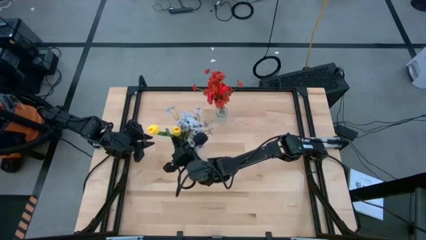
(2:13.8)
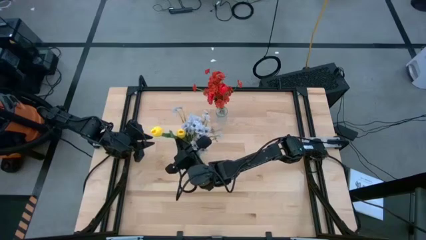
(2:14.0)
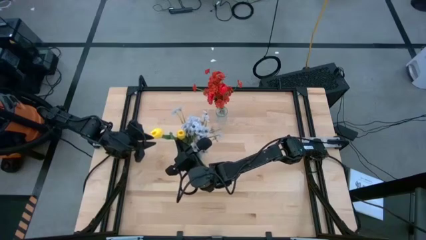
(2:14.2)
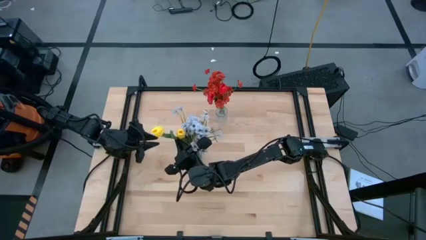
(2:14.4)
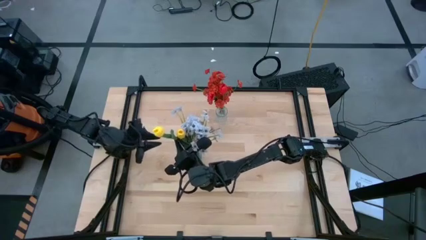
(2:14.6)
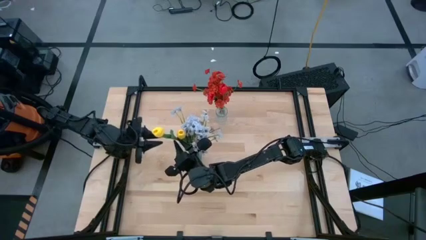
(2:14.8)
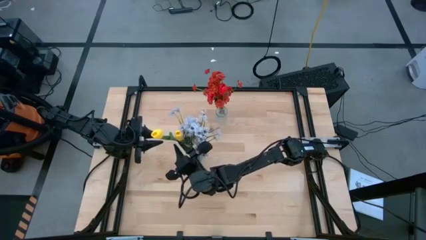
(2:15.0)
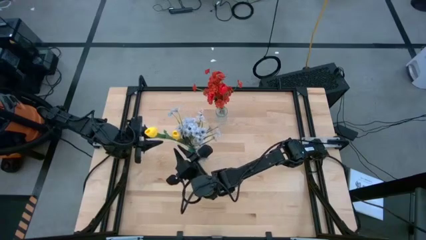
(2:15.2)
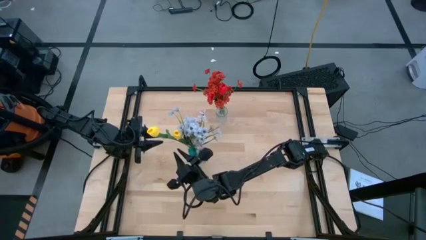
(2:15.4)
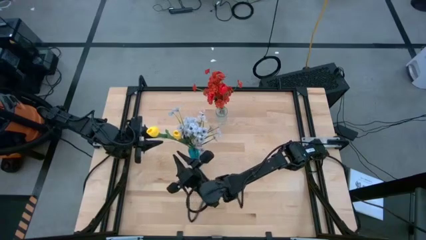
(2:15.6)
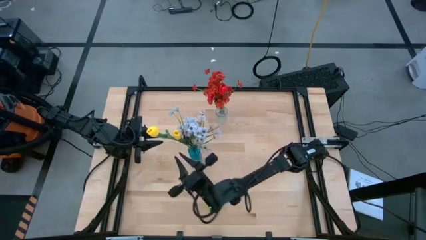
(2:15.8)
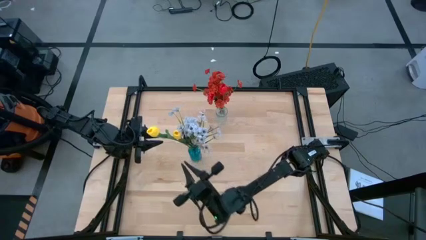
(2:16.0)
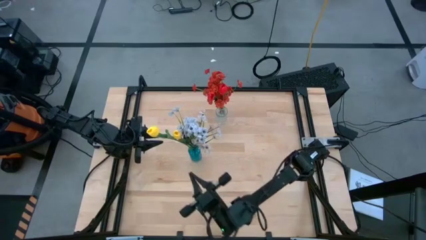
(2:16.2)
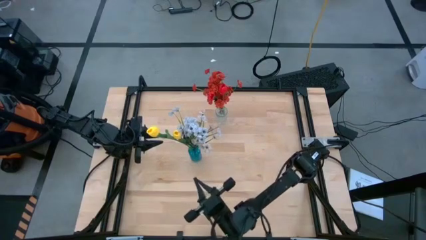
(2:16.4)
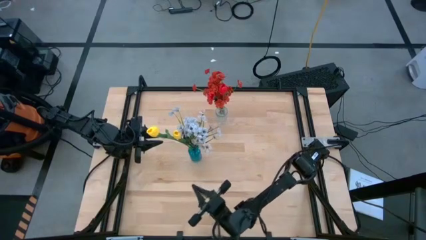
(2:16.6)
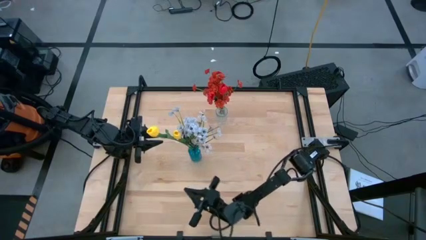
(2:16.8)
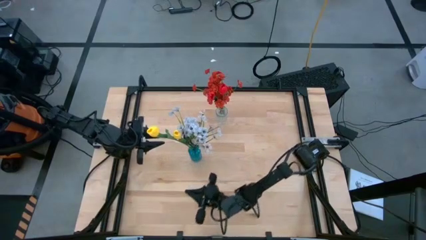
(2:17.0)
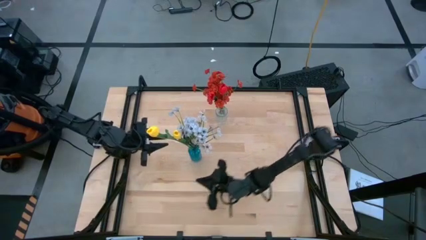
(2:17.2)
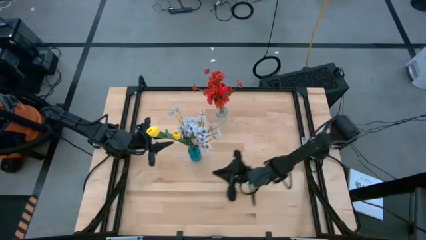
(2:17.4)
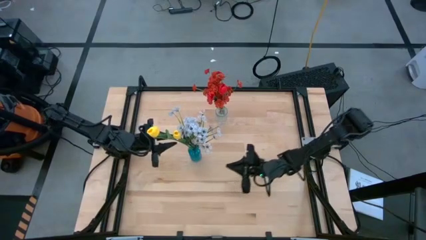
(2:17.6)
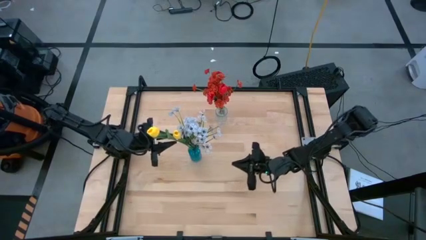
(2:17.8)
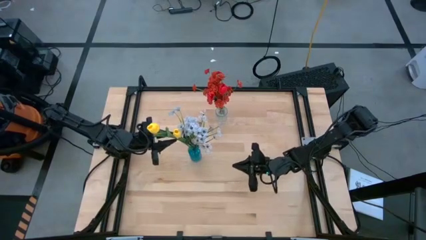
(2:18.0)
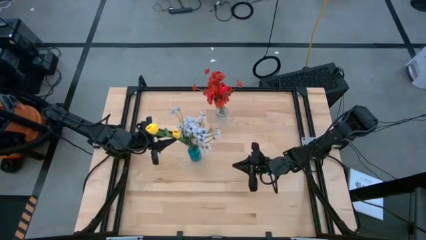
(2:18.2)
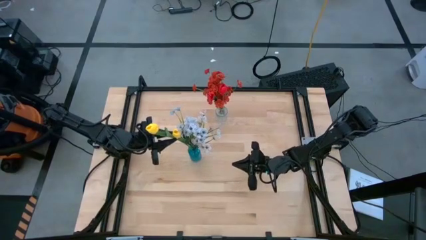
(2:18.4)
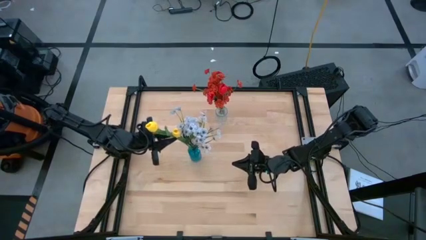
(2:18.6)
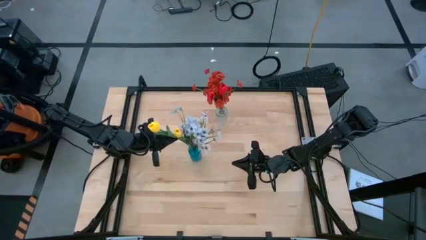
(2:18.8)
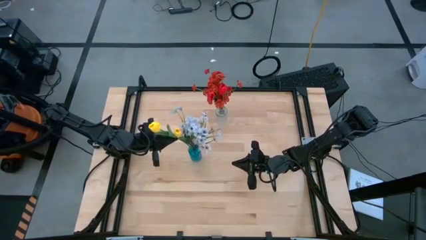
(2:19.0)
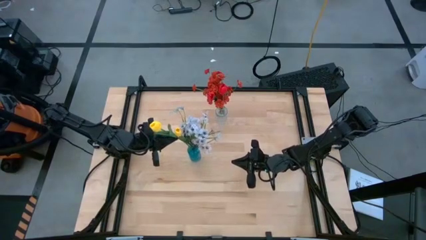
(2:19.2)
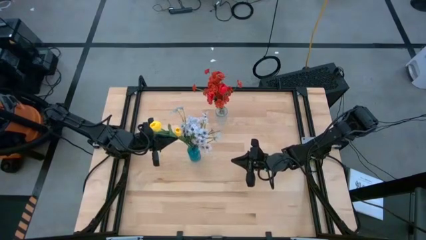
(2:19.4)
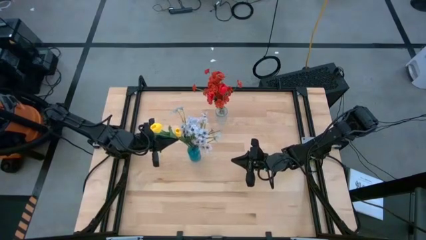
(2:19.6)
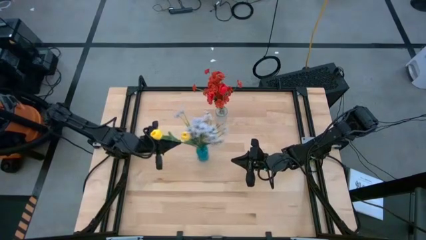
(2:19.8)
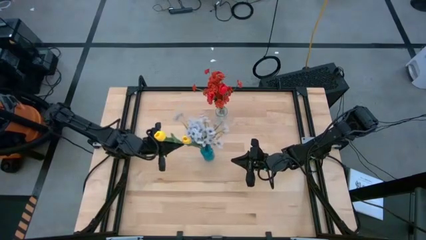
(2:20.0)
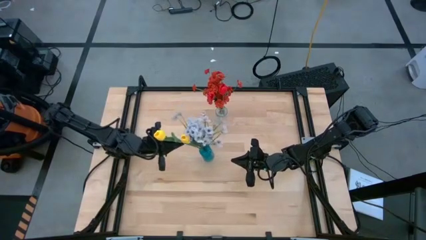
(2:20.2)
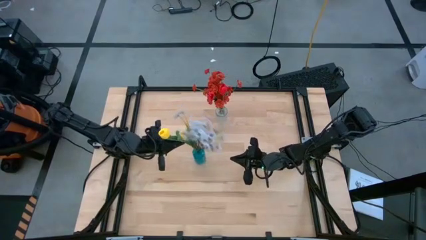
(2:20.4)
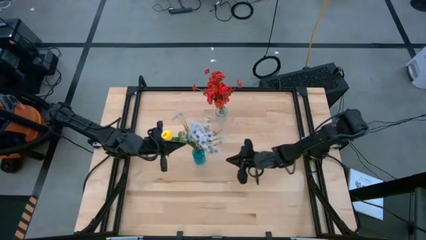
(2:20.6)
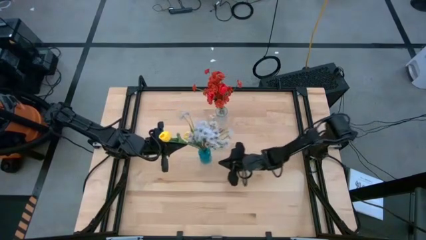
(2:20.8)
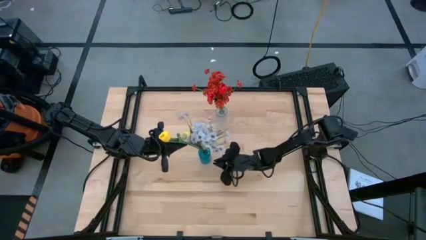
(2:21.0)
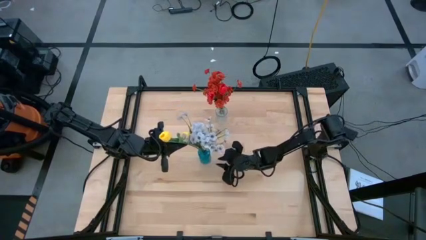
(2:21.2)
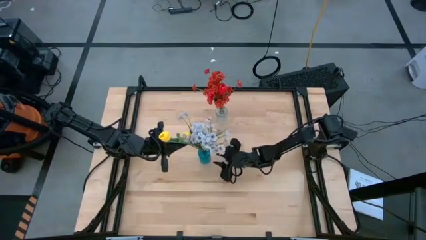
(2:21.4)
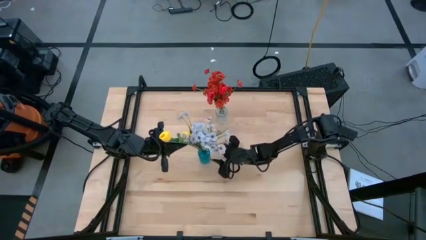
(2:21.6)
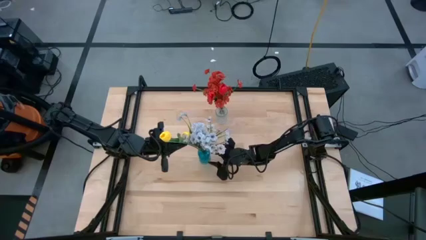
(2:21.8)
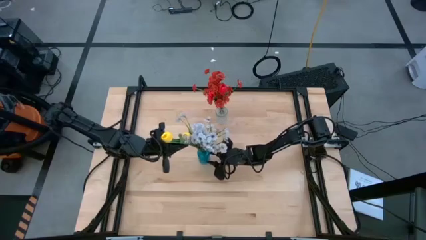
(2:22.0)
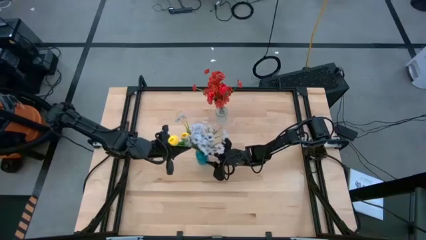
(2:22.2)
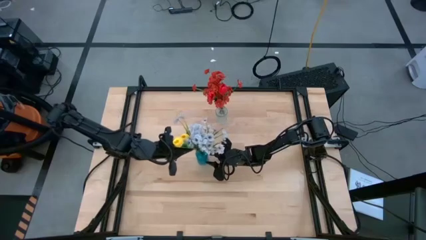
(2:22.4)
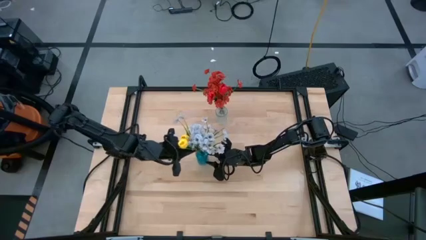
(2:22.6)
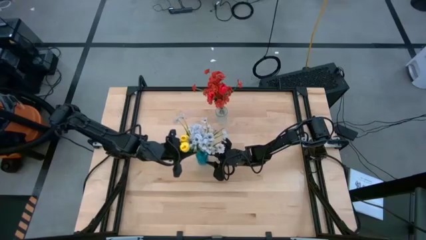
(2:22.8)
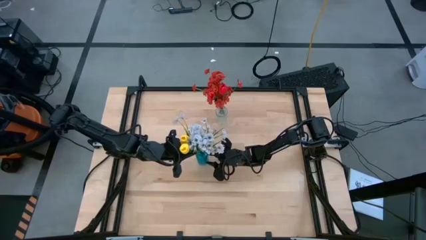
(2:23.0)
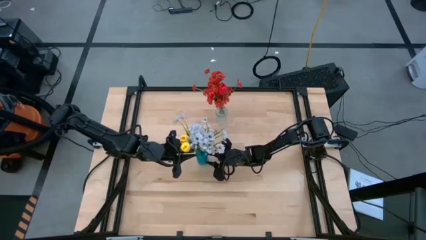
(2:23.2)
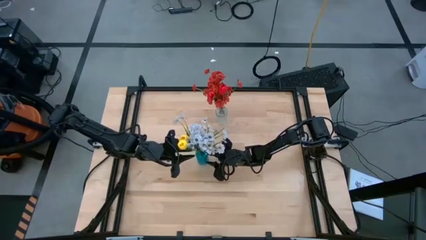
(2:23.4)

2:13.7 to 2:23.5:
Task: Sort flowers into vase by color
Put the yellow flower into the blue vase

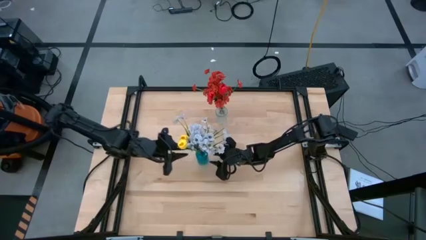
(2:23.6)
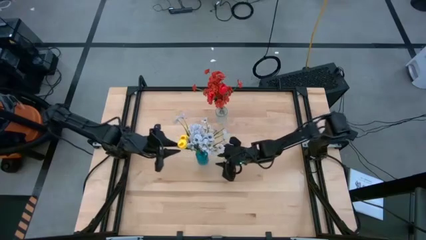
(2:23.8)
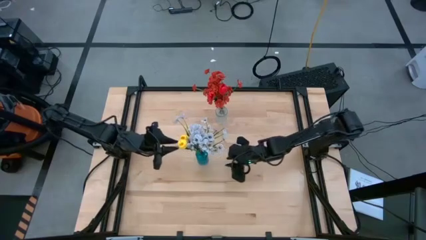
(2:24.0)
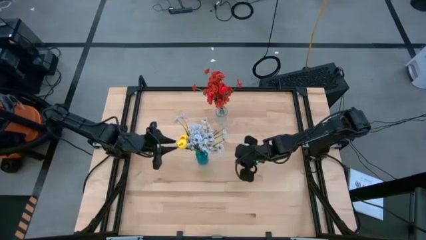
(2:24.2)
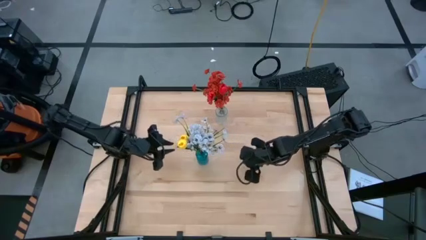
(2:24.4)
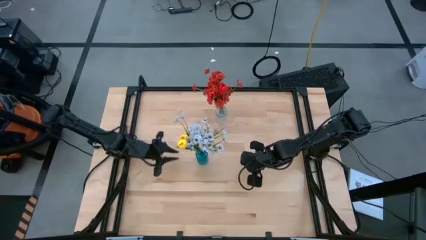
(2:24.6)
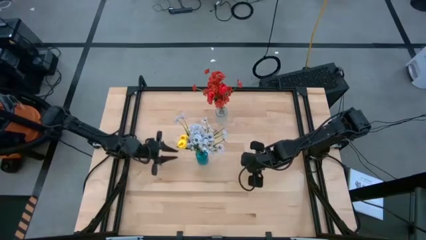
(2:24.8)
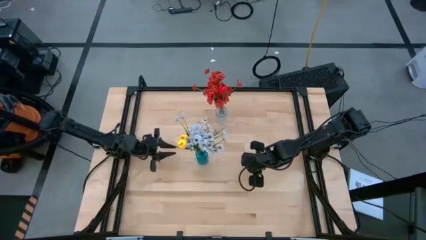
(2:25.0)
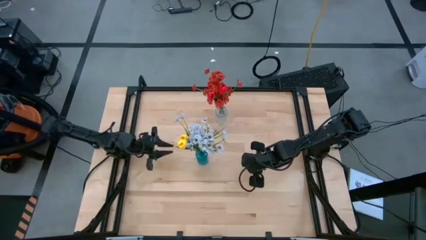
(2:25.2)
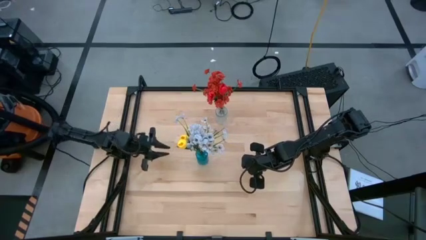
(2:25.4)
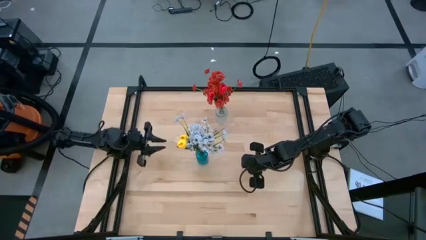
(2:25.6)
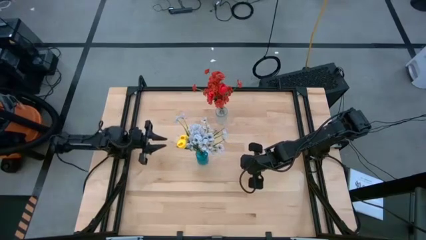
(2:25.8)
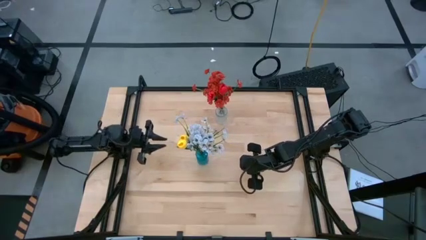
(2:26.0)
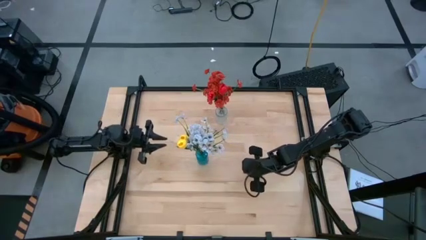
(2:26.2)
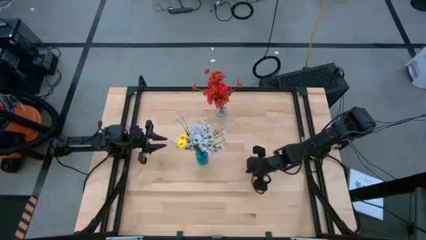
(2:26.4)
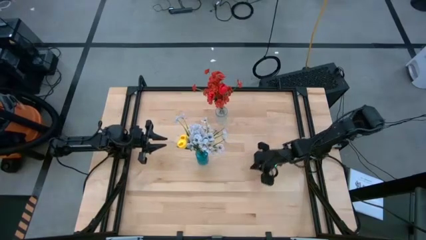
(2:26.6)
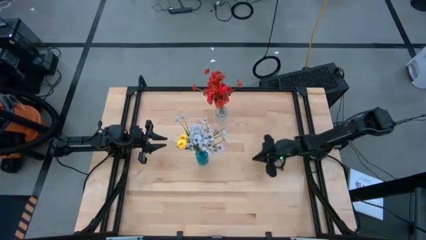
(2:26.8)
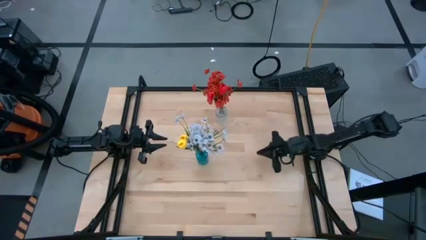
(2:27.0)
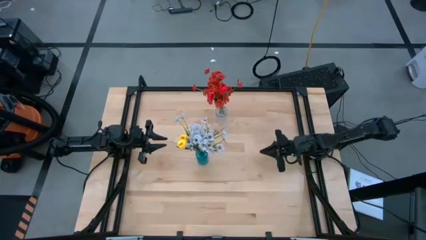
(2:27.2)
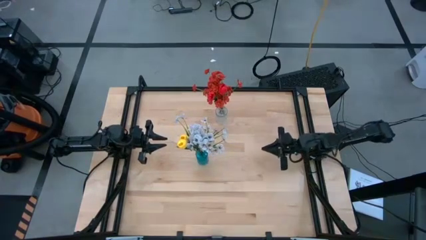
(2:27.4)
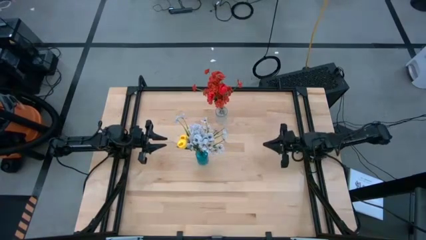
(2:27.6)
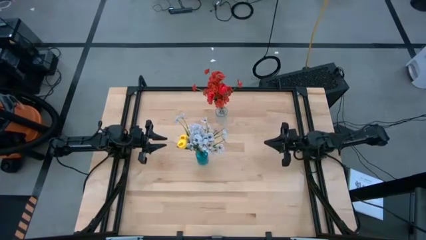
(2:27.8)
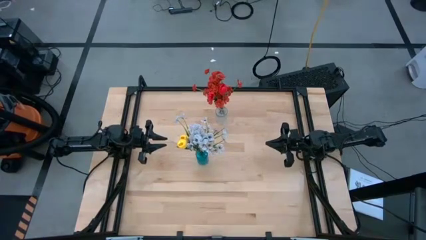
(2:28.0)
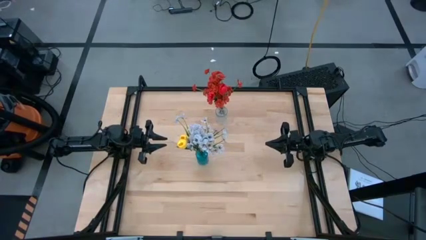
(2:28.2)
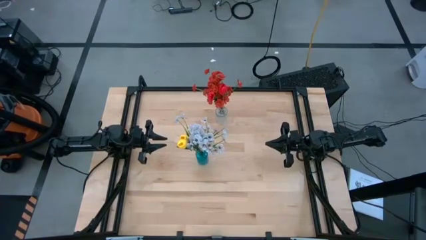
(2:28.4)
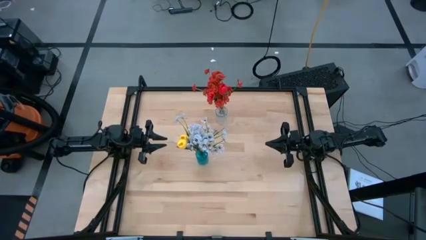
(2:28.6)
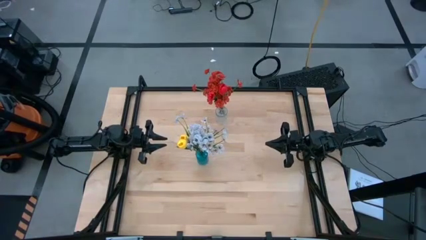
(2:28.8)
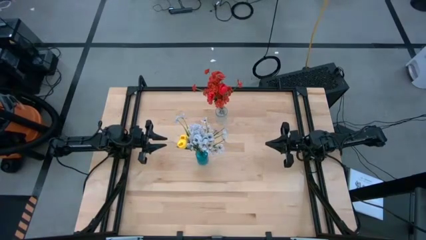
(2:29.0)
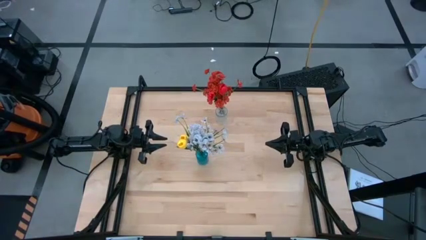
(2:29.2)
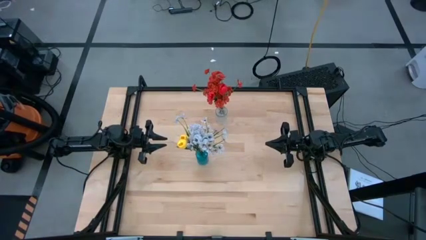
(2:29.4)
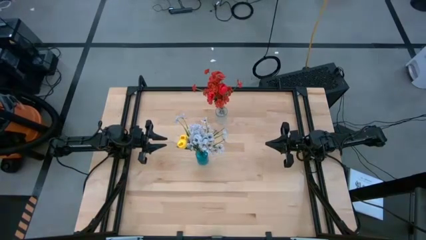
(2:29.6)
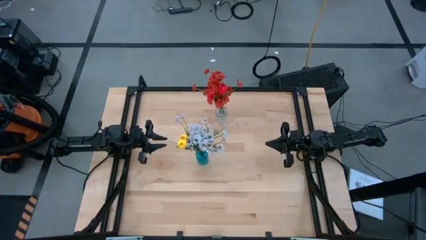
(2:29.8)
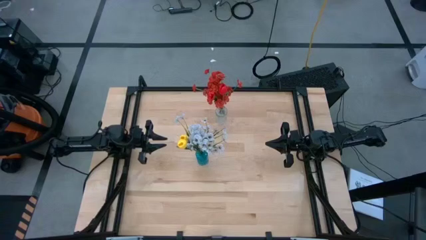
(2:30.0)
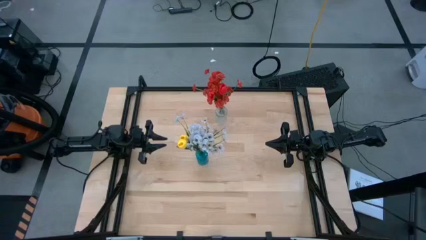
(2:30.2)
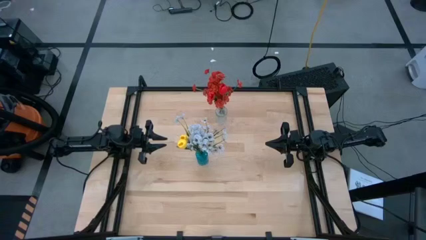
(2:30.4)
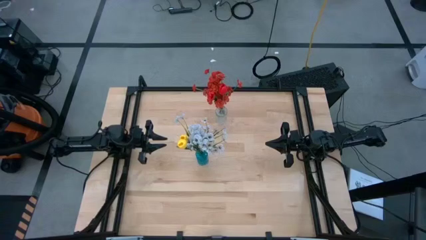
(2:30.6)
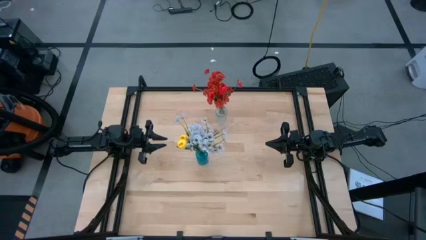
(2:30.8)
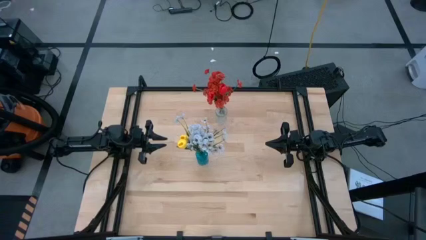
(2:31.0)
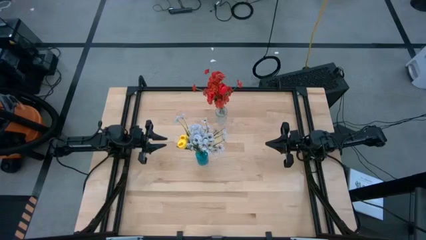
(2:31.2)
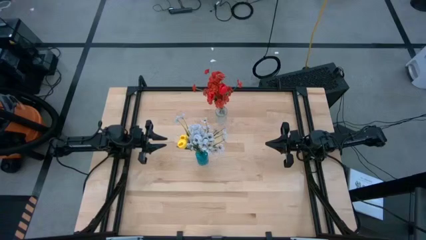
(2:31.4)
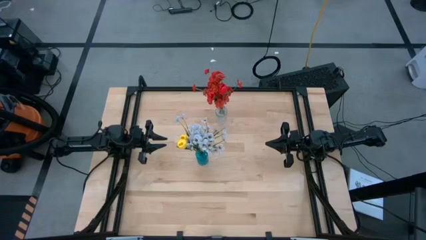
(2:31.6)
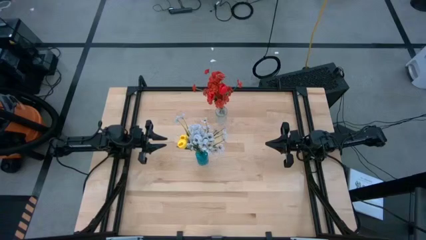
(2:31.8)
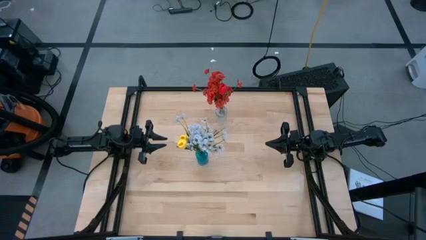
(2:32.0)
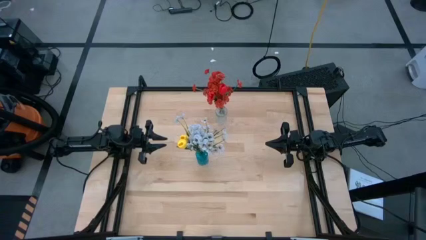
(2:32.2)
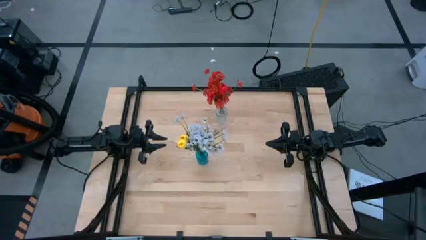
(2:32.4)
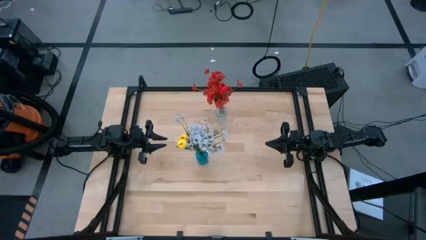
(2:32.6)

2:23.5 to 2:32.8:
Return to Home Position
